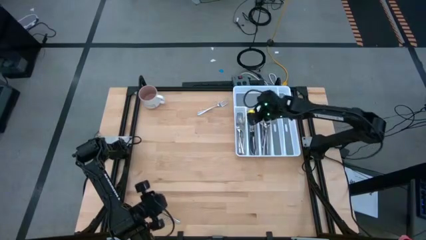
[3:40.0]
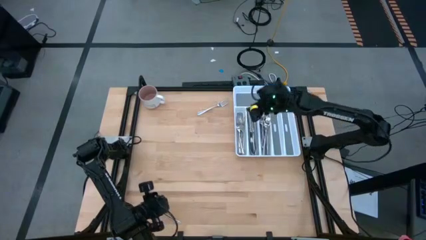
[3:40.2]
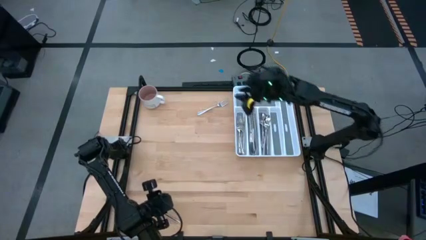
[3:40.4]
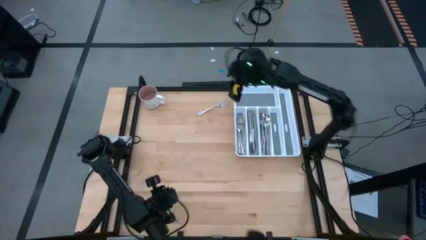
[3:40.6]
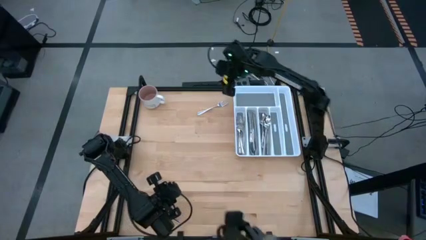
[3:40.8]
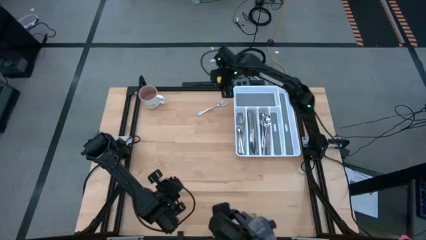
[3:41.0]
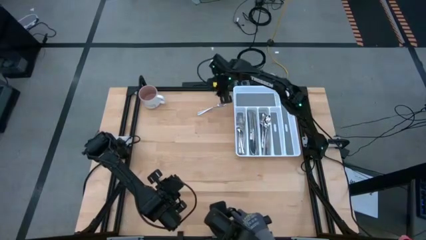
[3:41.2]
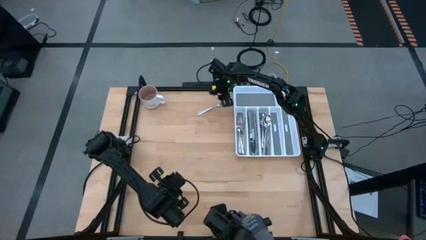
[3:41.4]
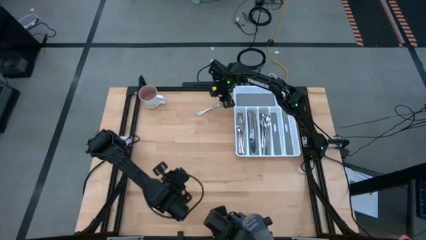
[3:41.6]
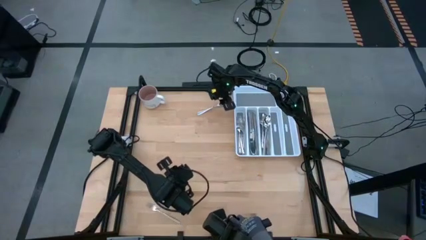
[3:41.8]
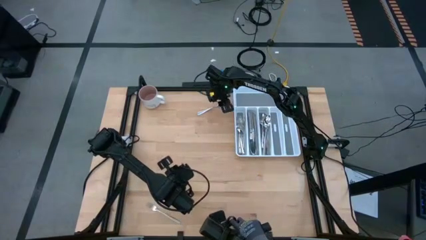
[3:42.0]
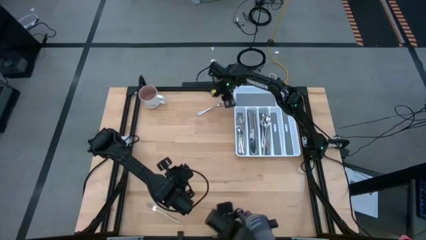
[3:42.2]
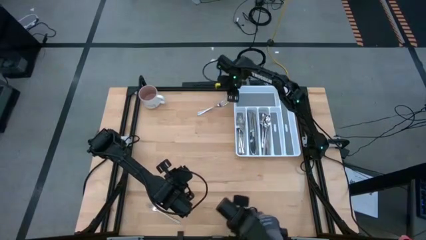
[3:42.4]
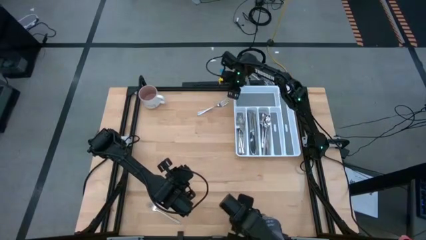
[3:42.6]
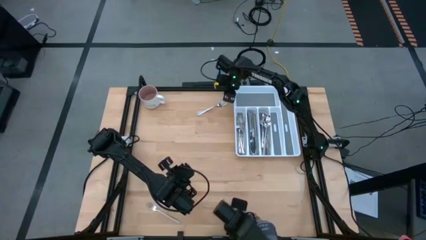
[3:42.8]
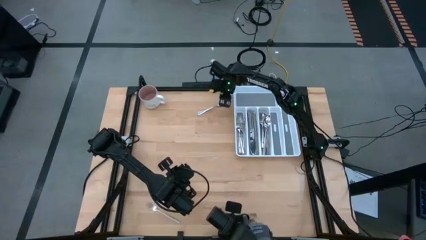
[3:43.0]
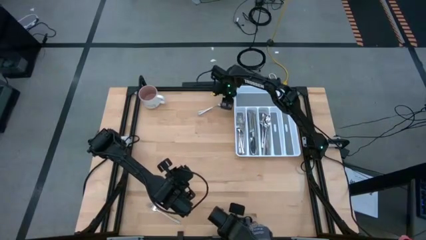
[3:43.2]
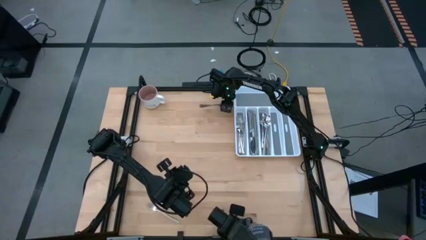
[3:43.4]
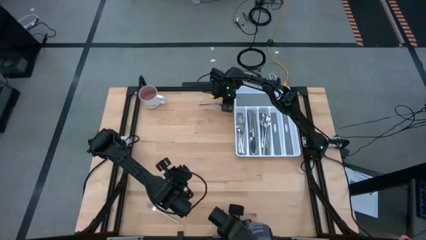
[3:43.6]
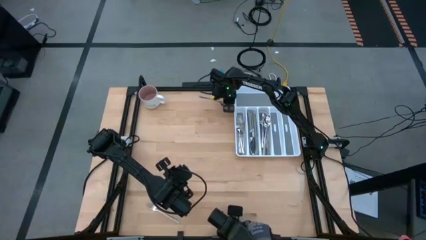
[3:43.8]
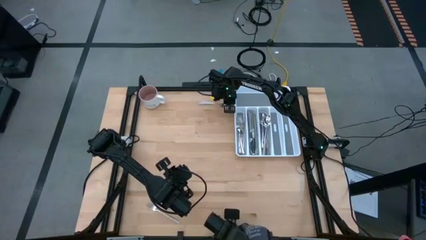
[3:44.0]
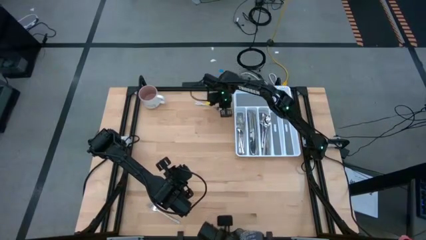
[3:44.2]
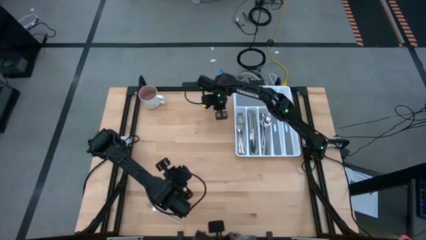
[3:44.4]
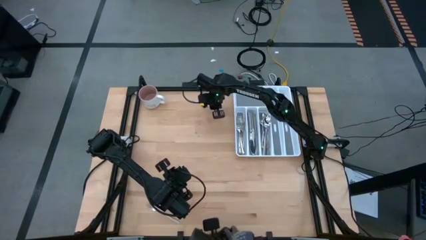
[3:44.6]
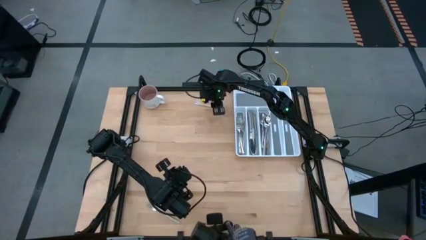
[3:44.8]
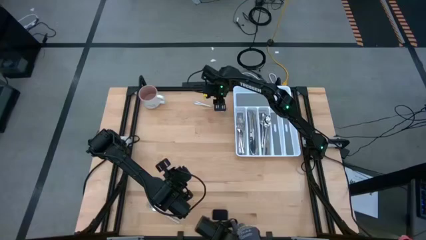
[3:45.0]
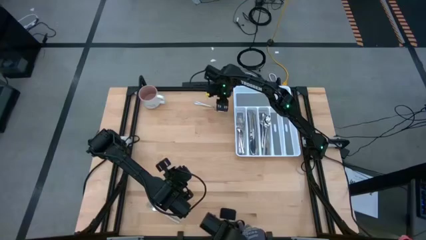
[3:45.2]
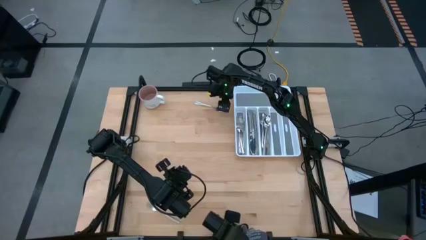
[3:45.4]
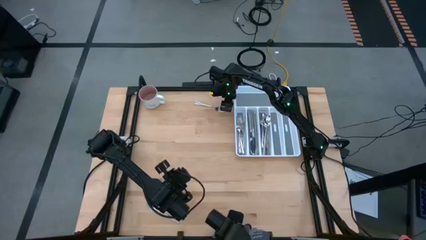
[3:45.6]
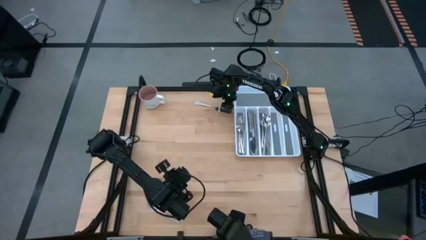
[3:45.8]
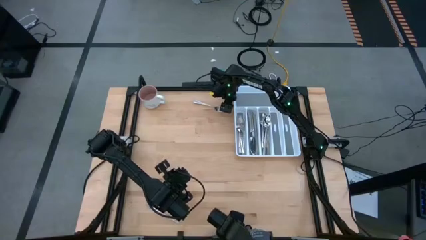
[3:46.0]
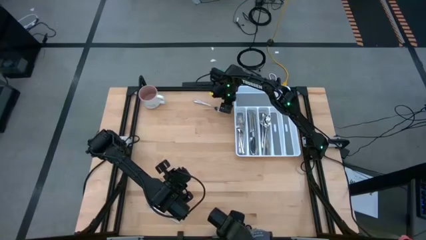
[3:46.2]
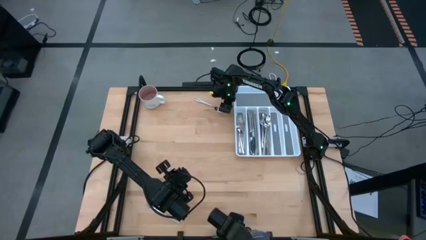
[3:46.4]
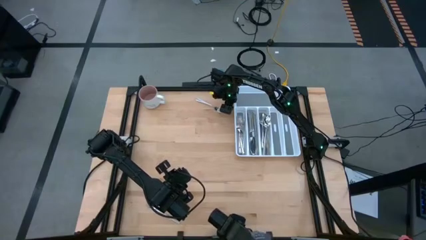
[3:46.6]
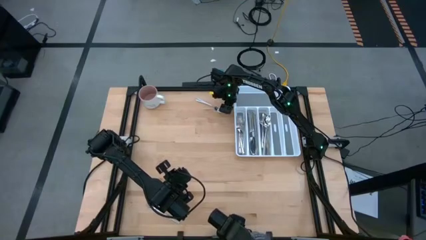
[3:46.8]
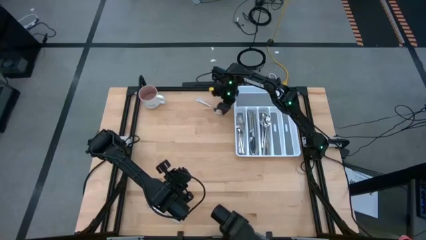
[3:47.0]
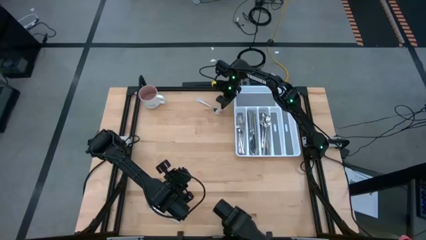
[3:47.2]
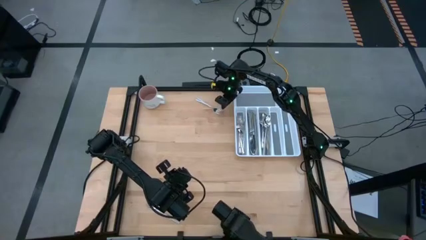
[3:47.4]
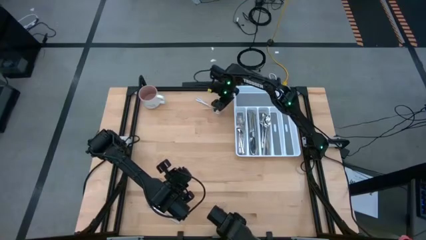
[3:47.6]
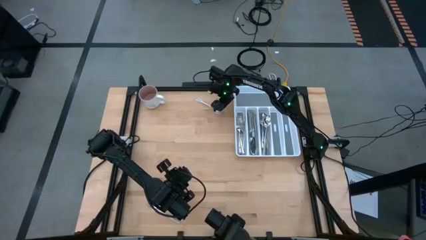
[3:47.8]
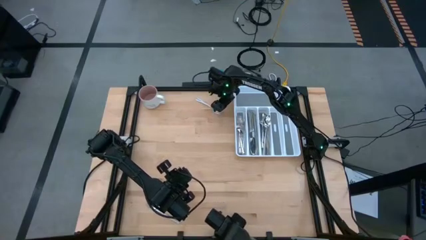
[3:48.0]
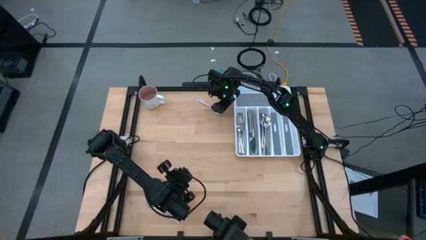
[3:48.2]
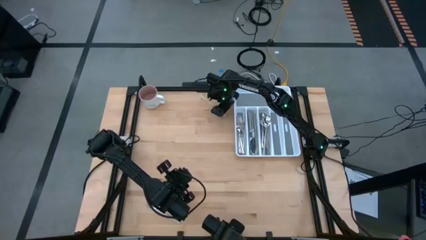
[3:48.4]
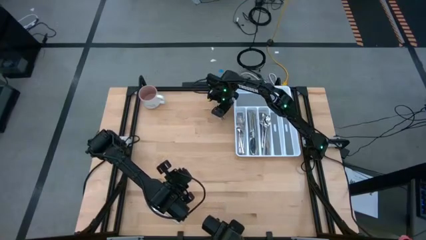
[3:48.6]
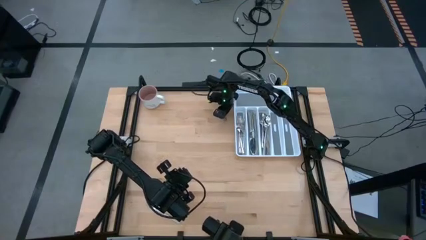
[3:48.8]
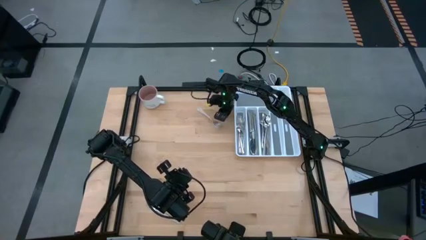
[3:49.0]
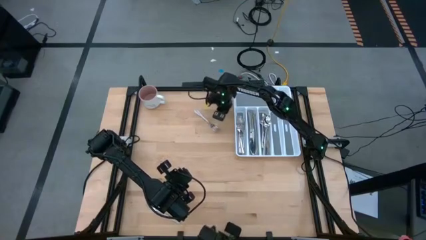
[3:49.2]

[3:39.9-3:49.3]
Task: Sort silverware
Put the silver fork into the left slot of the white silverware tray

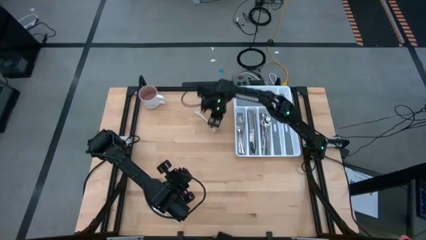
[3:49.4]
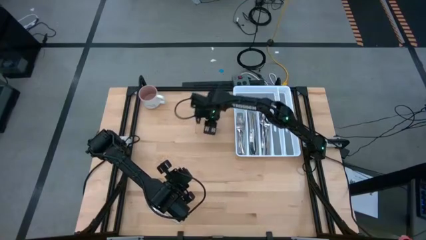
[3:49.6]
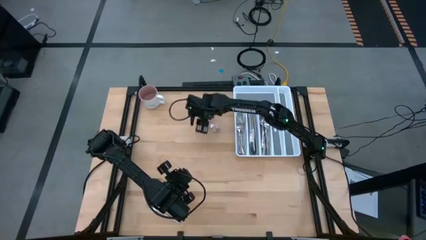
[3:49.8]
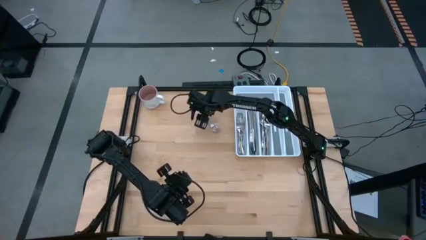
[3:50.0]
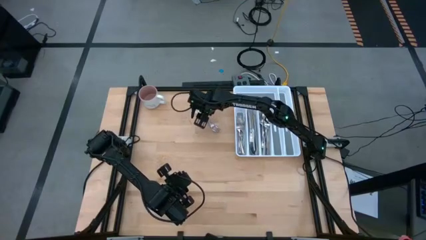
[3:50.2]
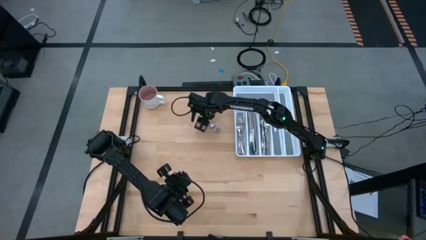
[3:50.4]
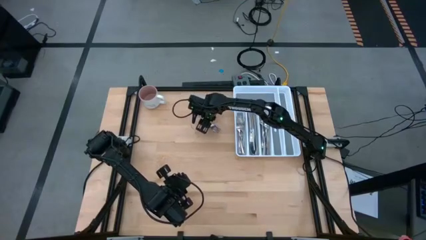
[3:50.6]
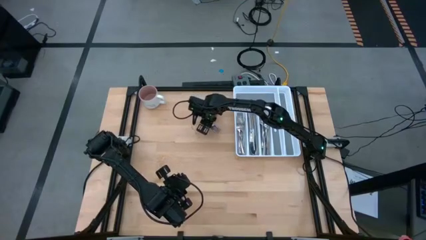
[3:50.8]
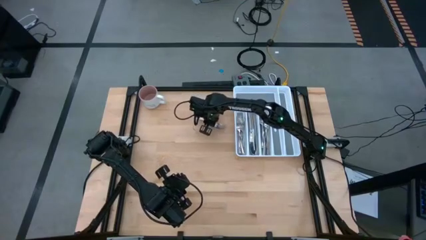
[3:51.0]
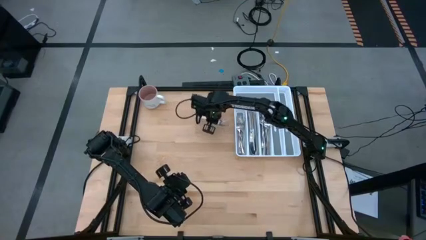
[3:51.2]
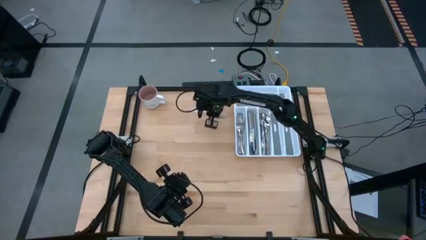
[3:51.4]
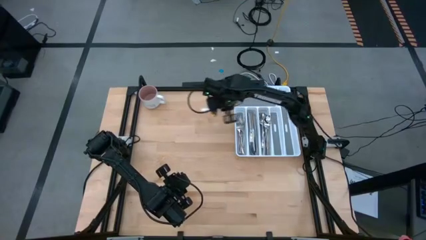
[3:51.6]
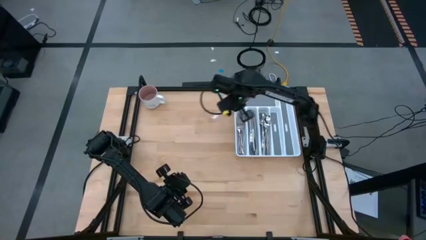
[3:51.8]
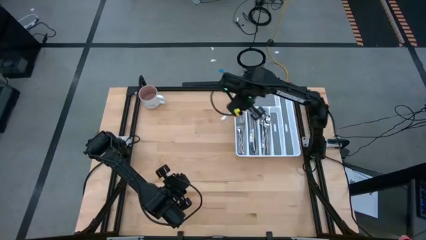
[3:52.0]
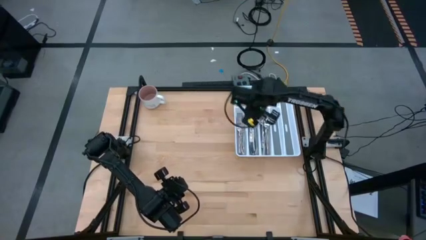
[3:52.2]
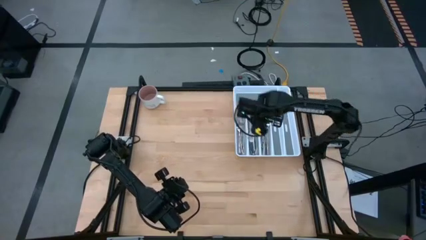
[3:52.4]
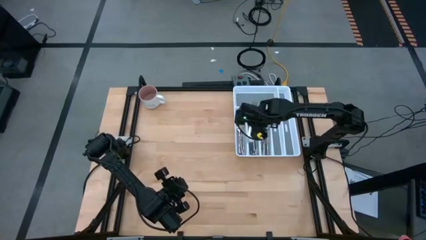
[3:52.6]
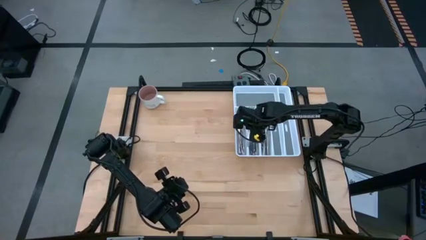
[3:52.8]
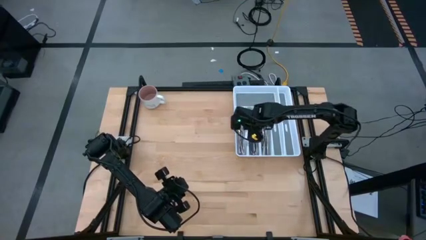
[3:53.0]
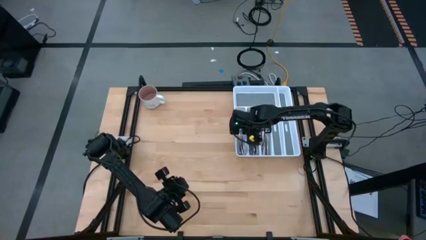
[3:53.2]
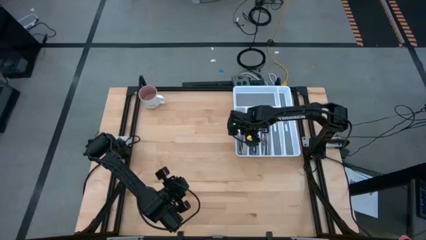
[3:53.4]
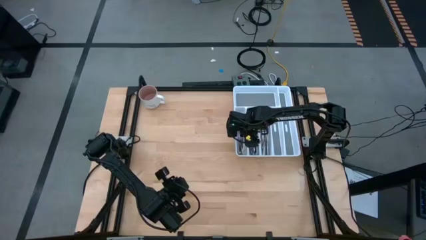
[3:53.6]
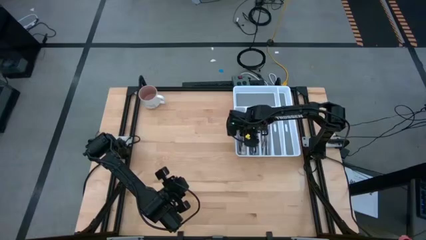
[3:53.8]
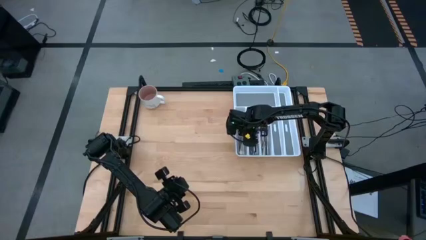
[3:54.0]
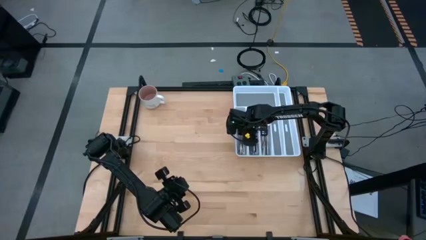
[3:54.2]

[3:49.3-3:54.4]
Put the silver fork into the left slot of the white silverware tray
